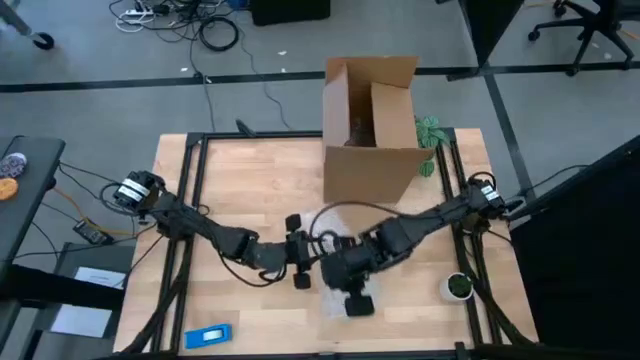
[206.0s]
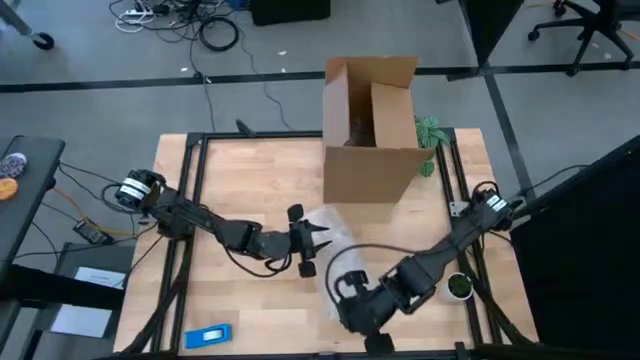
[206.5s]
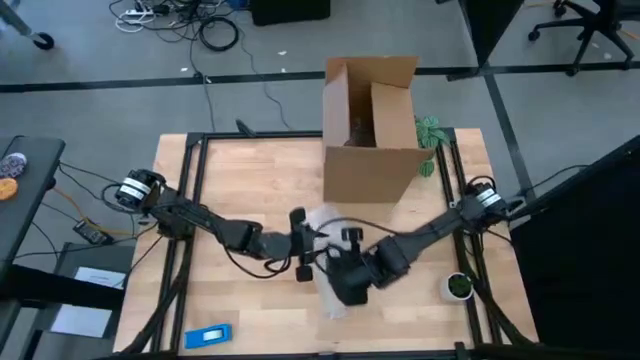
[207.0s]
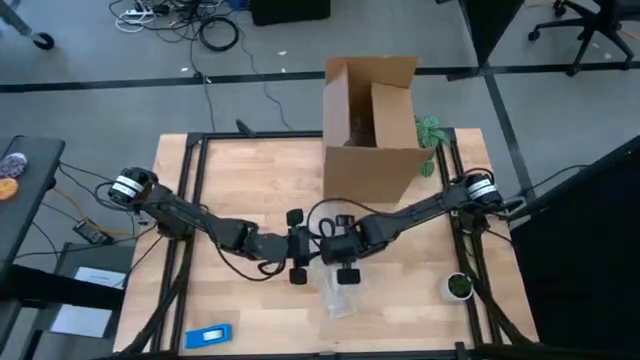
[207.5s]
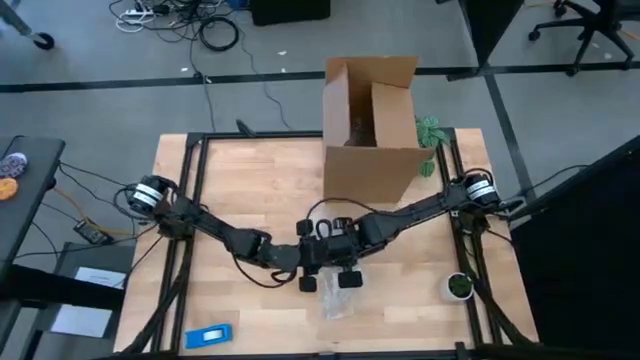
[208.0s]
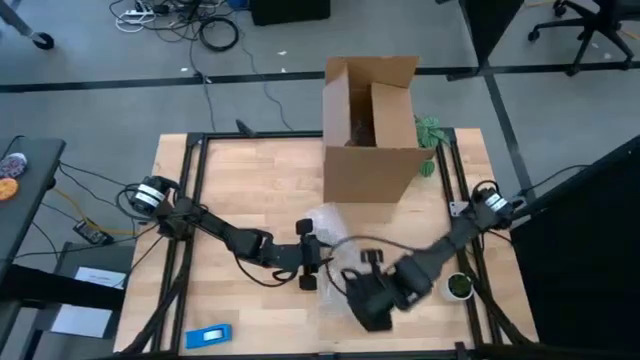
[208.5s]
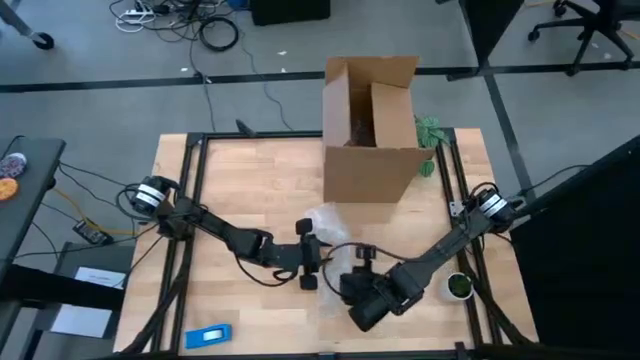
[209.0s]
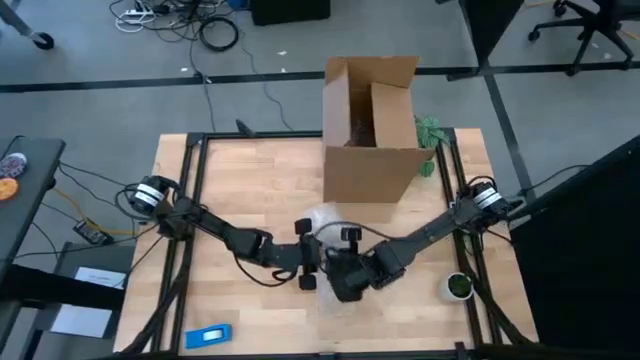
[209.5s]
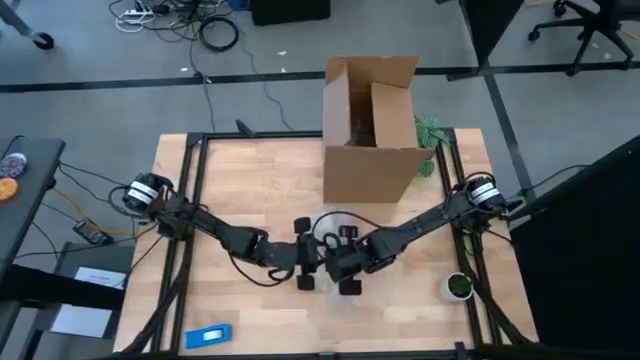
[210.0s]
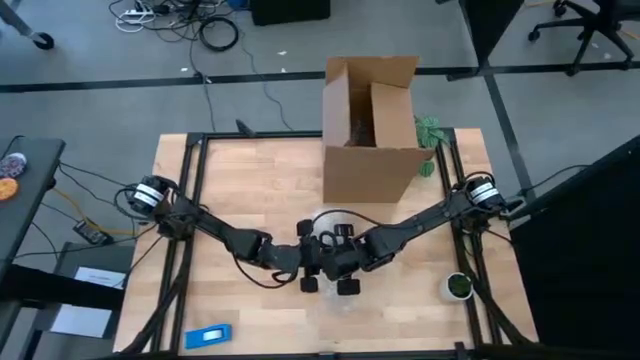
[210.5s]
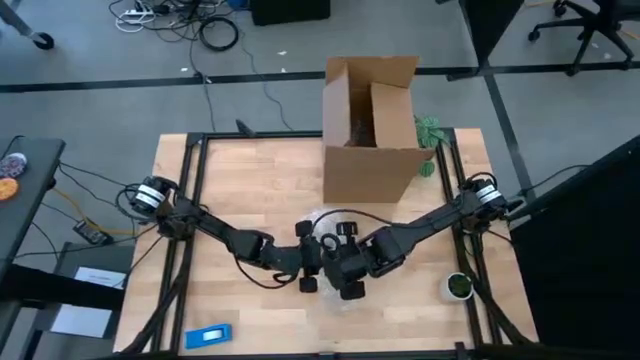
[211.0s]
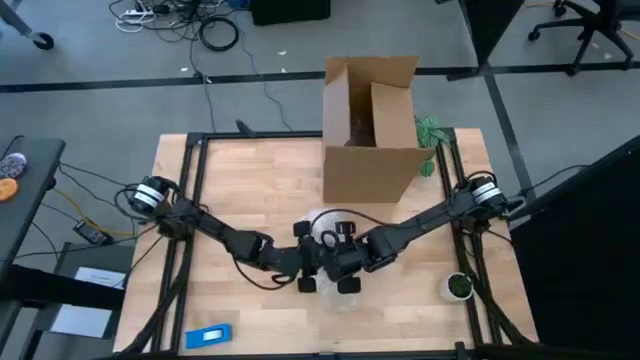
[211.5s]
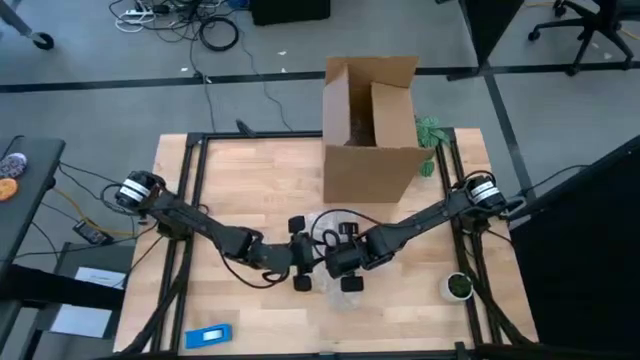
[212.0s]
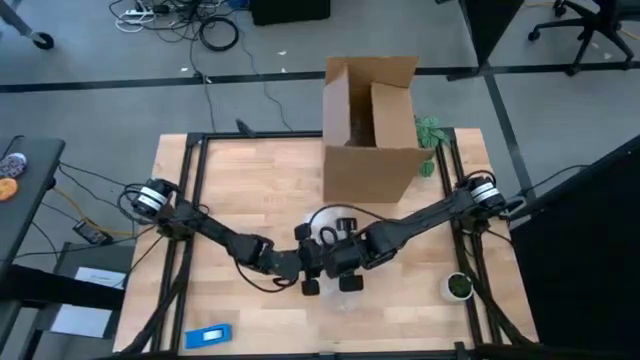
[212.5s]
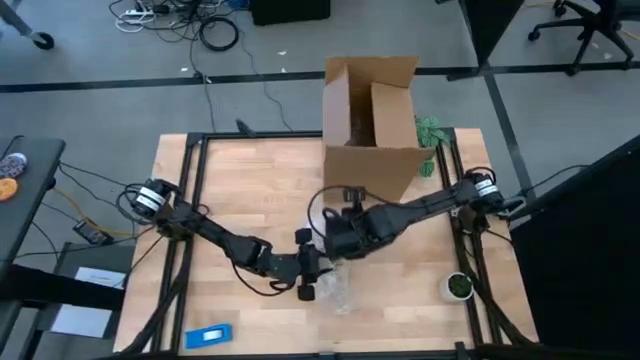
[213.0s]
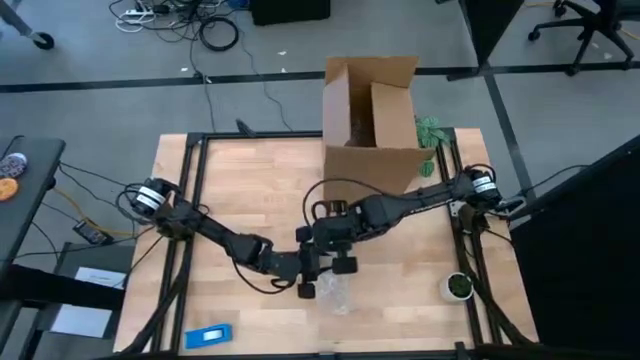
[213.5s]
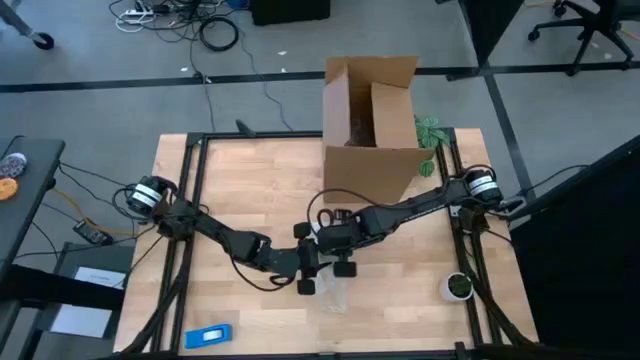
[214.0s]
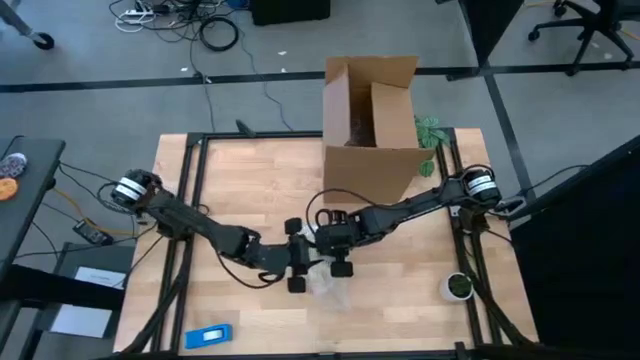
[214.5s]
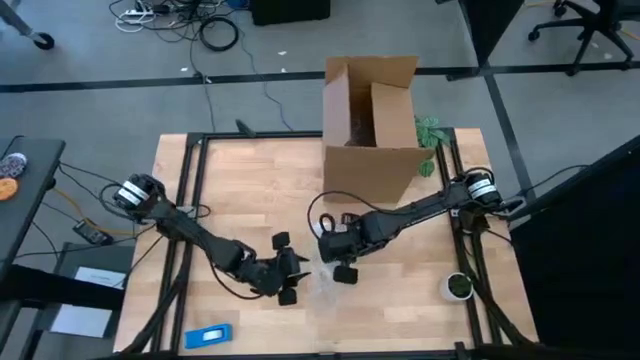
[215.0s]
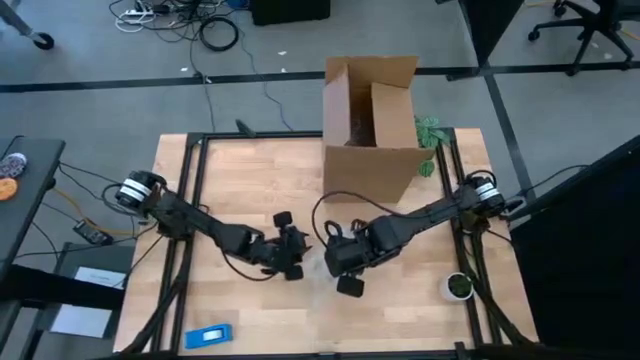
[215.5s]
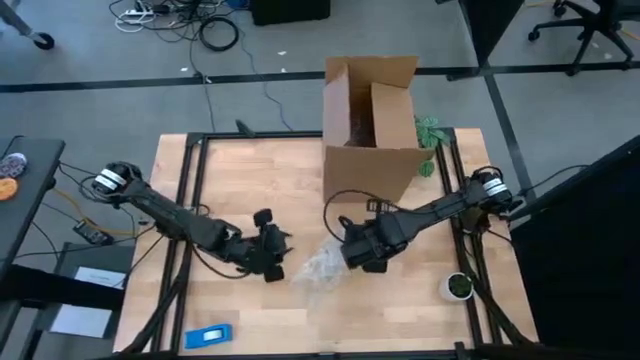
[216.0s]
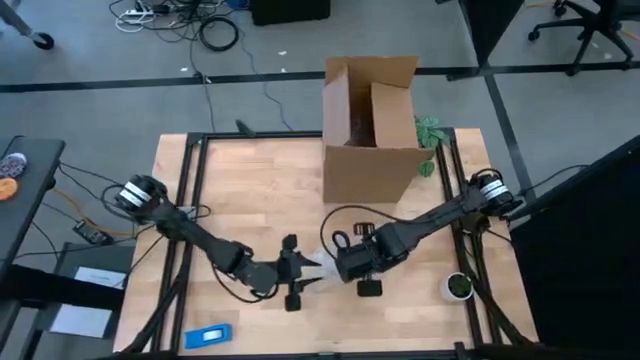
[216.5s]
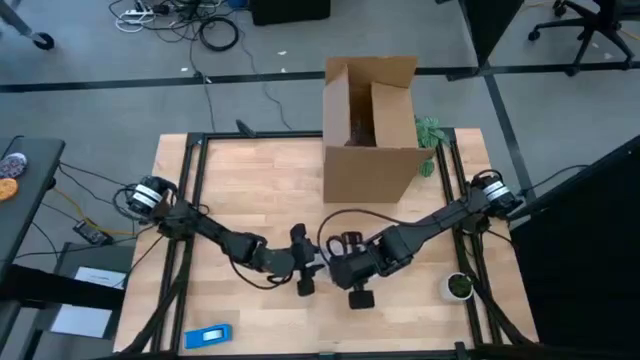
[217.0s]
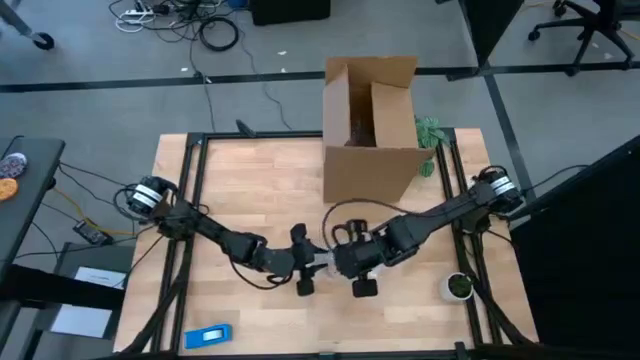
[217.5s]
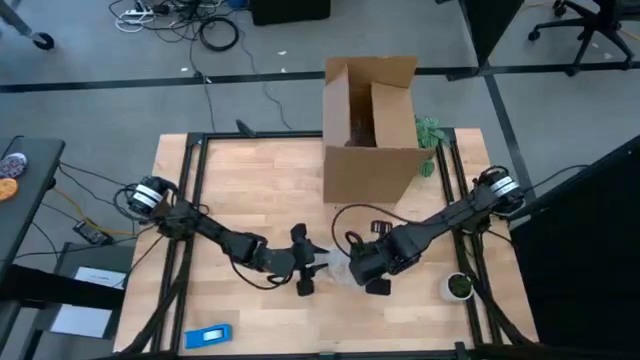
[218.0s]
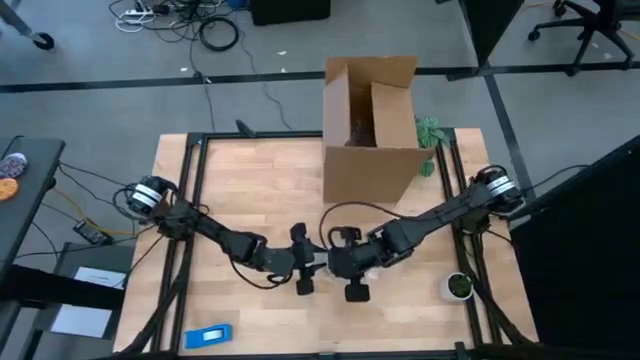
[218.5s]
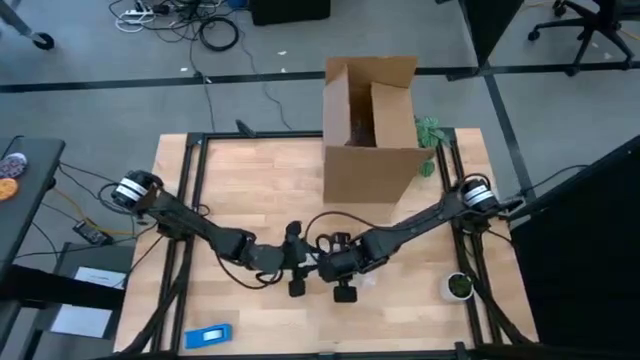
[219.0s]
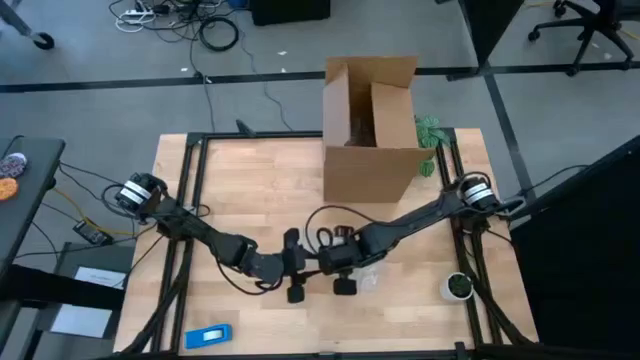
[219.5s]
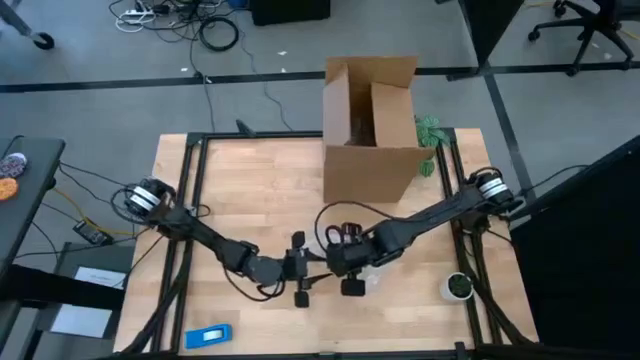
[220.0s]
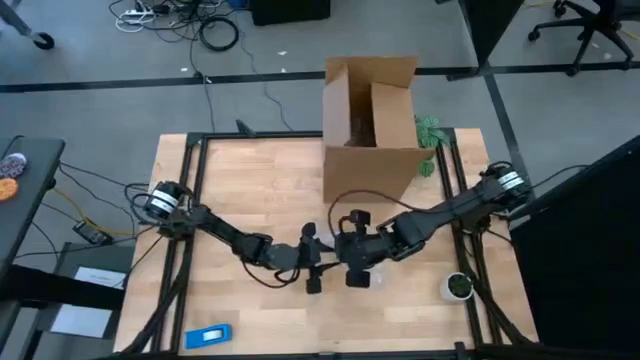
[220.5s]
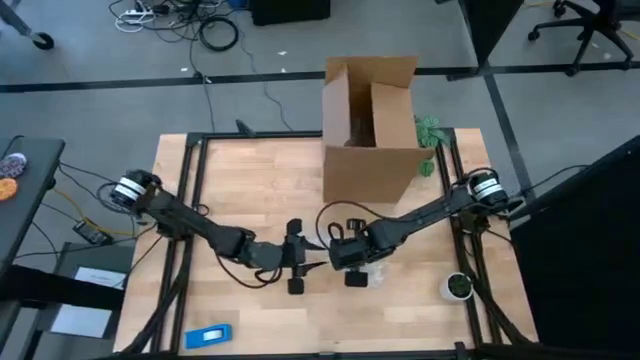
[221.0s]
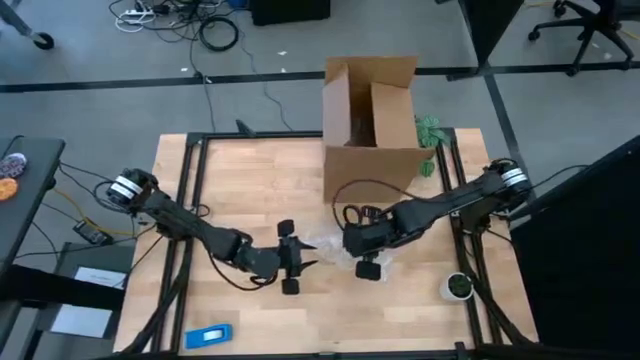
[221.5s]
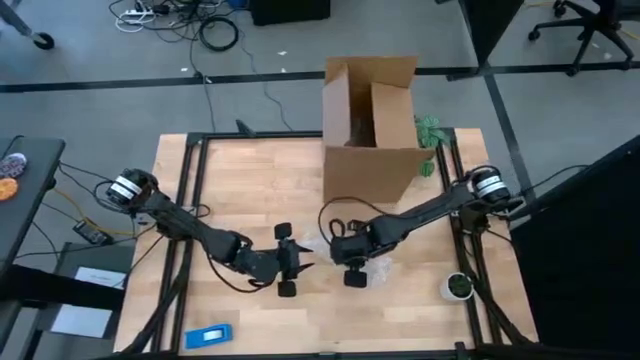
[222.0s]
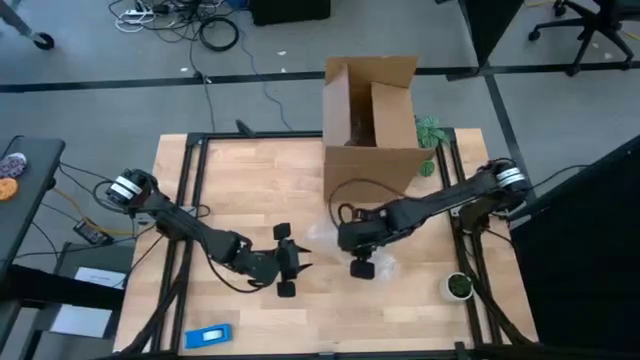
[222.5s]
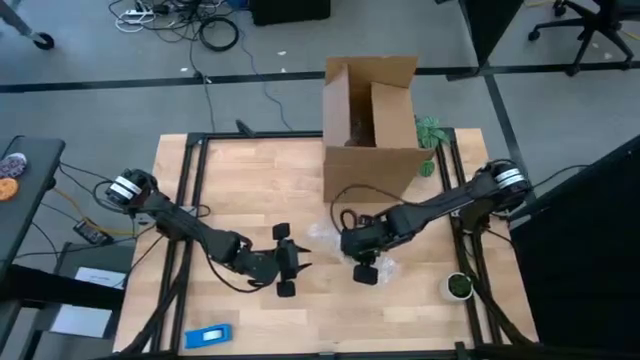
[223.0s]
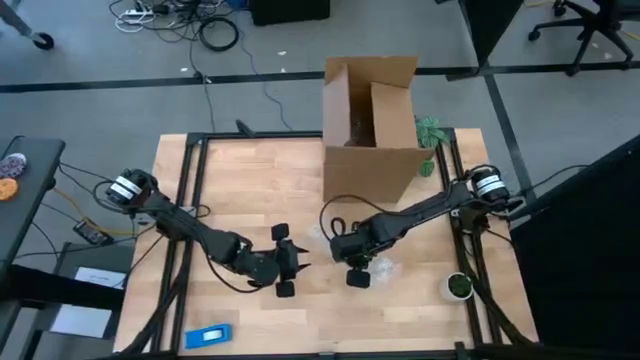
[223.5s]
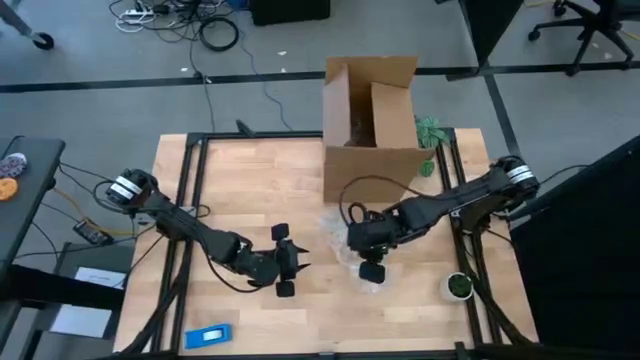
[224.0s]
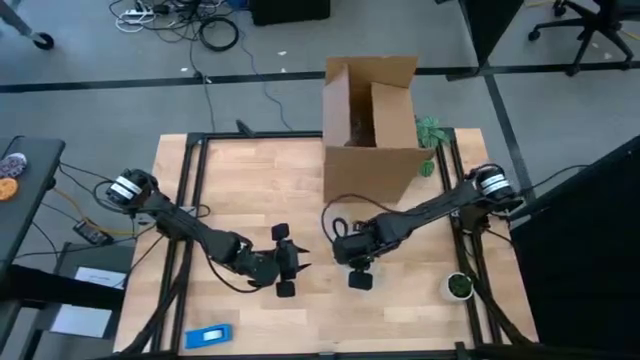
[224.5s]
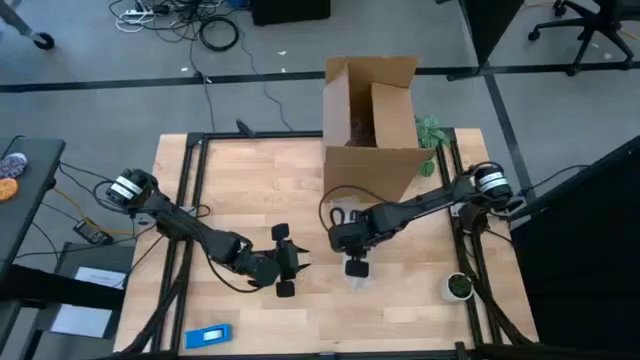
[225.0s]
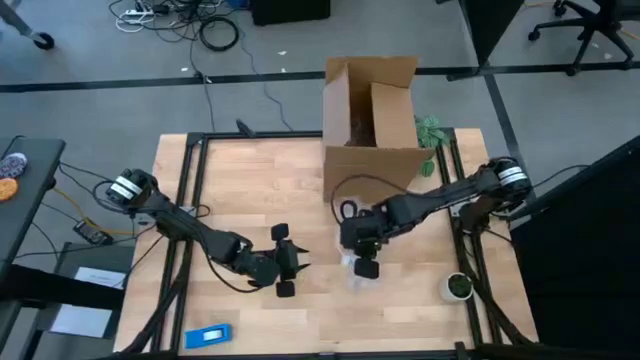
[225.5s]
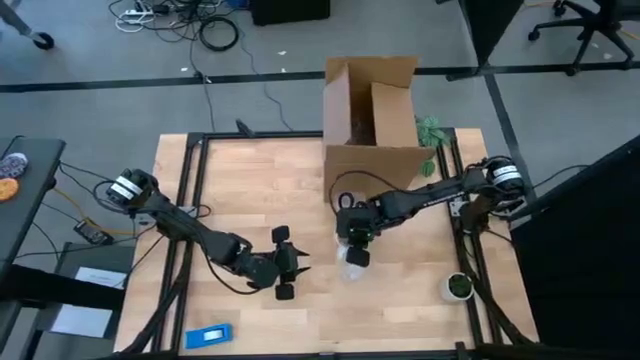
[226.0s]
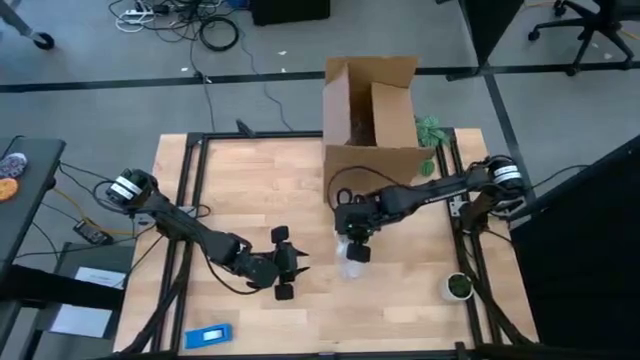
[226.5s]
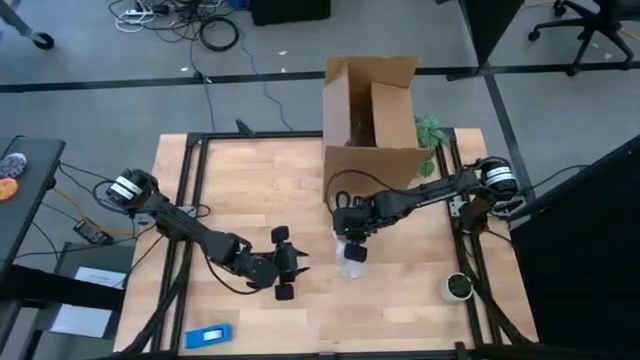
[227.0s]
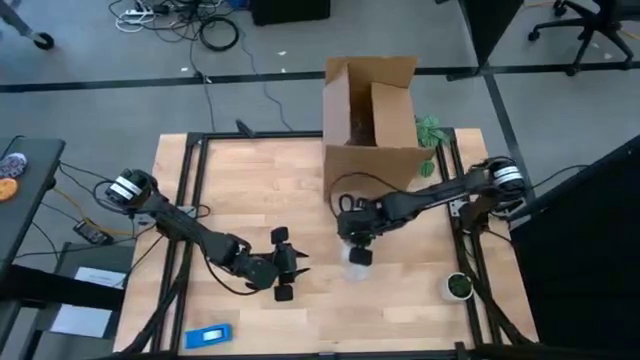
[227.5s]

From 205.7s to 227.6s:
Task: wrap mug
Wrap the yellow mug with transparent bubble wrap
